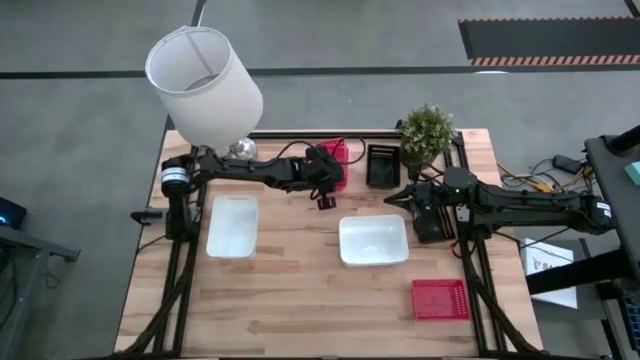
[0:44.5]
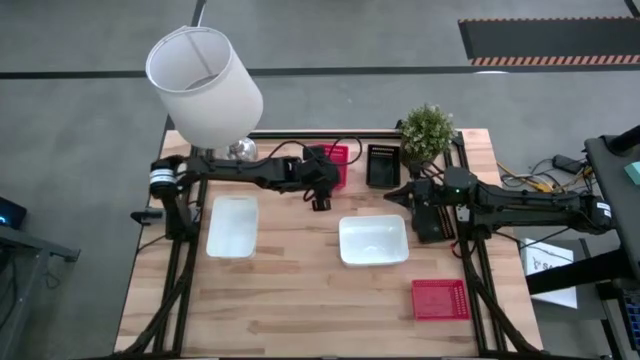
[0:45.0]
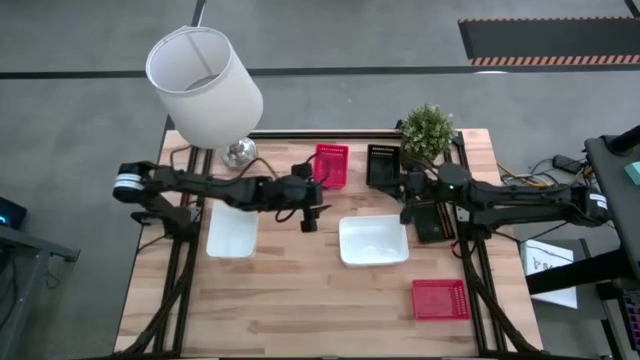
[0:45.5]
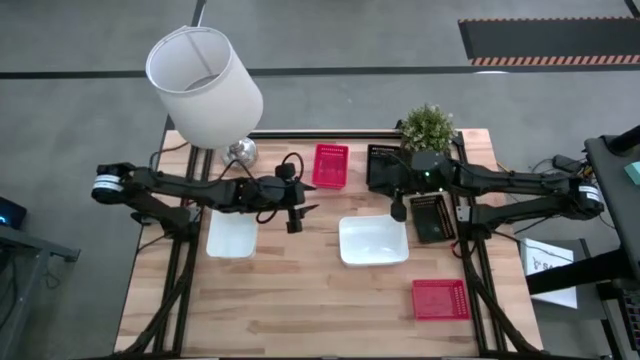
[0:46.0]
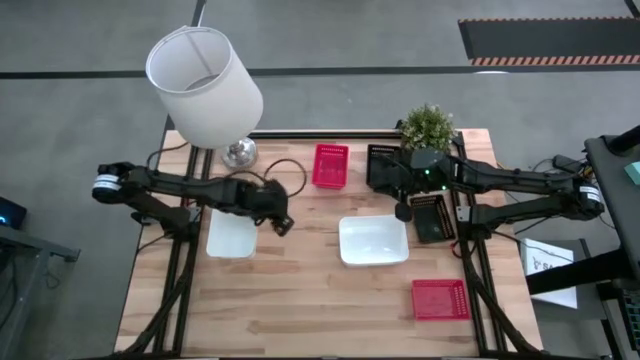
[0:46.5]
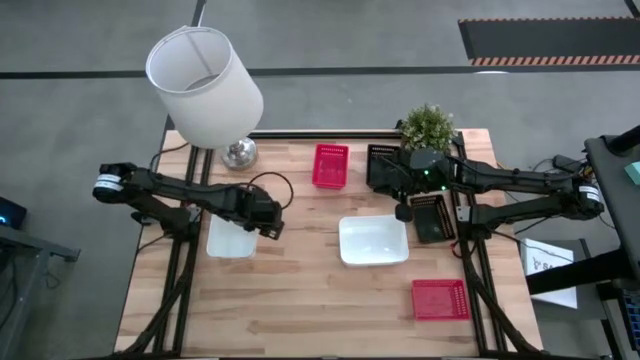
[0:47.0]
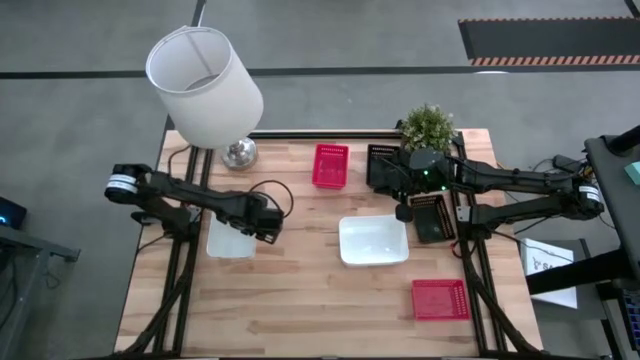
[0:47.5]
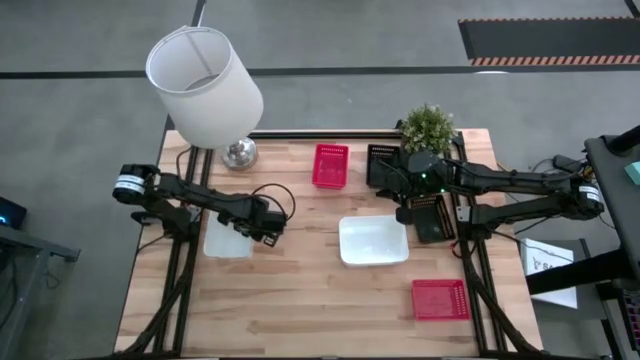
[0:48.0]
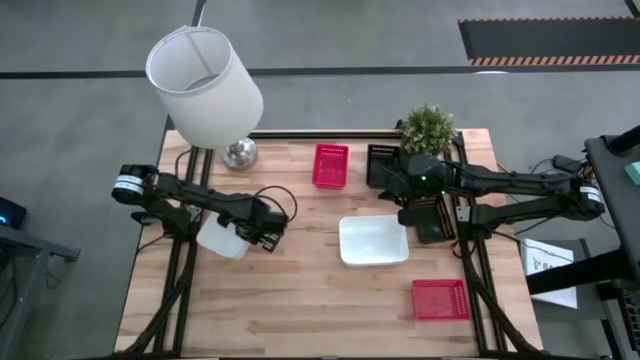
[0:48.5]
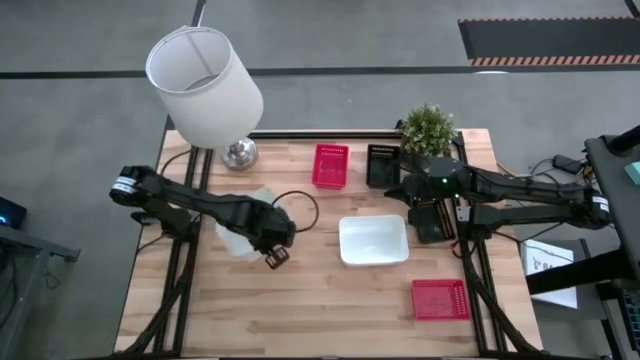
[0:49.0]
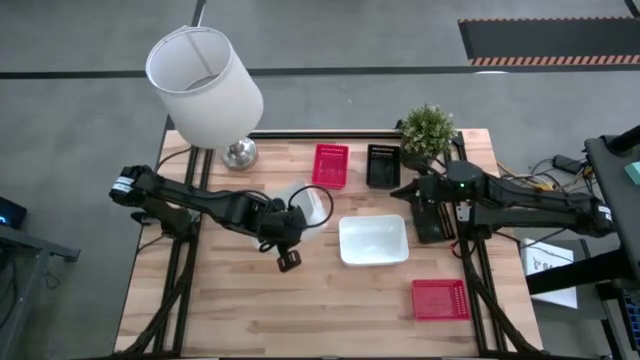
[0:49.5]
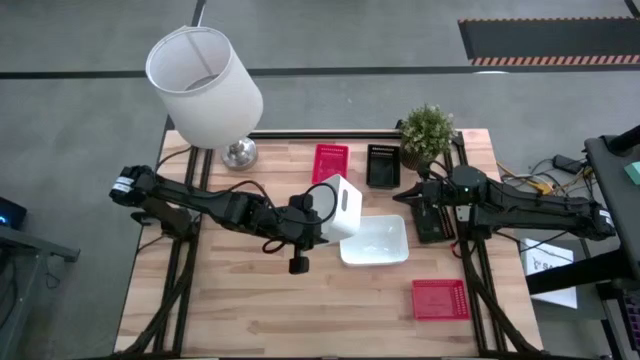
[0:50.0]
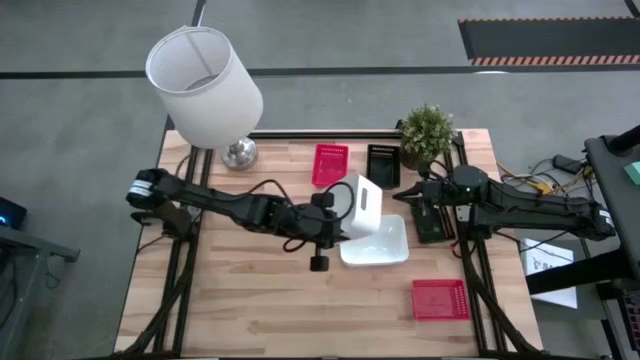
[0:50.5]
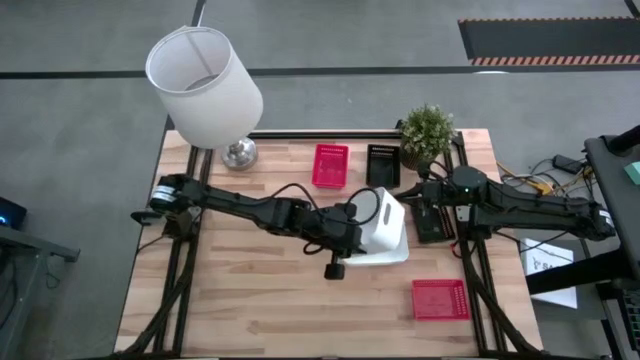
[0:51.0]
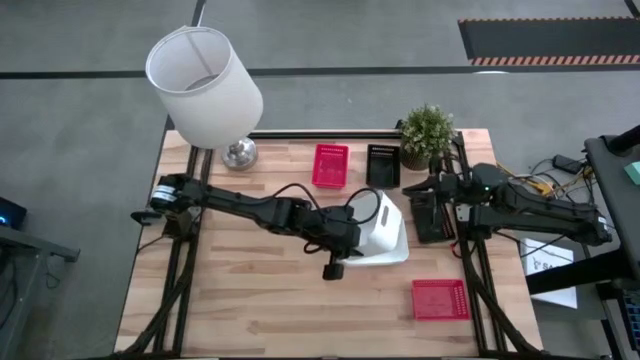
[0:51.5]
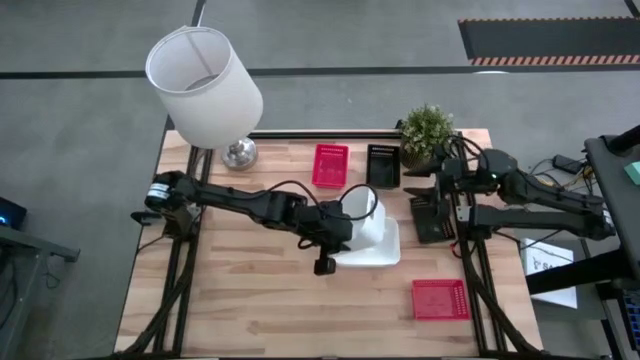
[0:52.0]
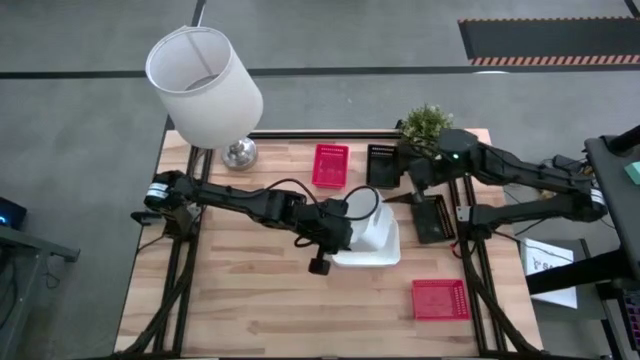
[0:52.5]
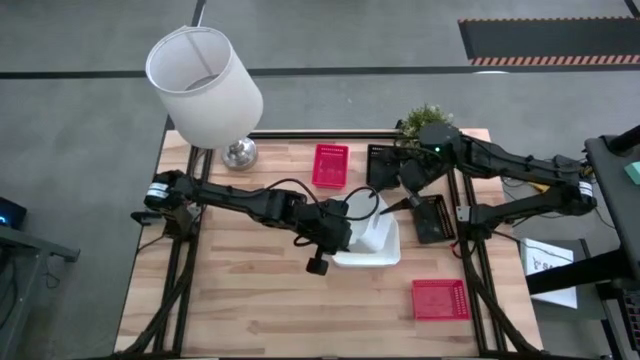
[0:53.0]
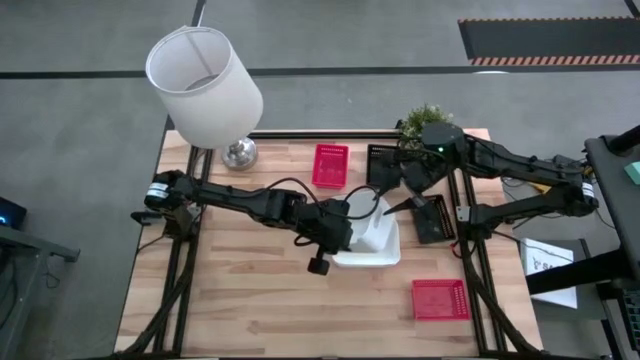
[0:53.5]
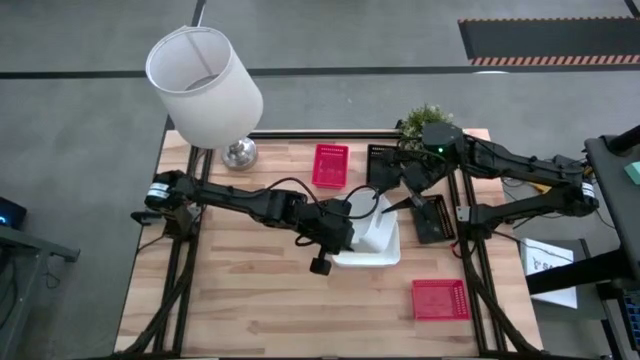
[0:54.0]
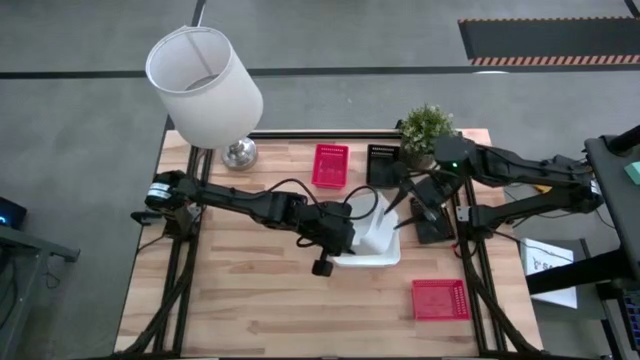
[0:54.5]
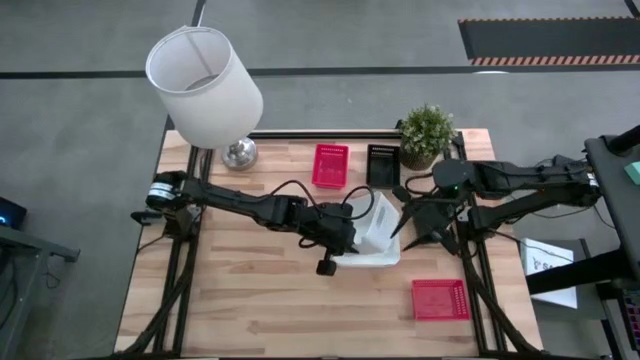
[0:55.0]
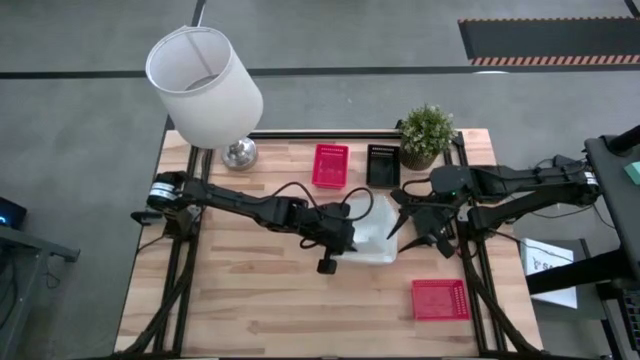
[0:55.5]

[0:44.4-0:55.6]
Stack the left white bin into the other white bins

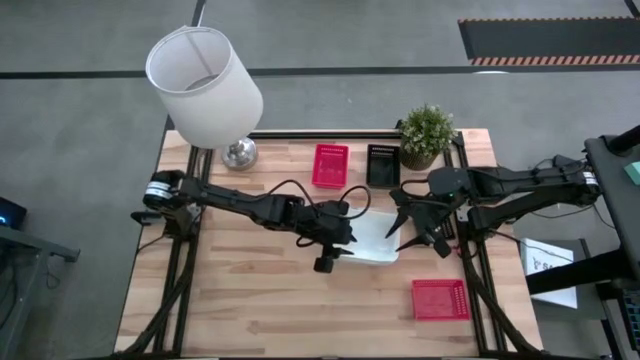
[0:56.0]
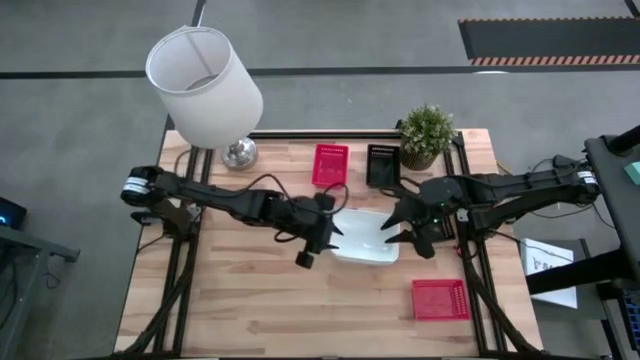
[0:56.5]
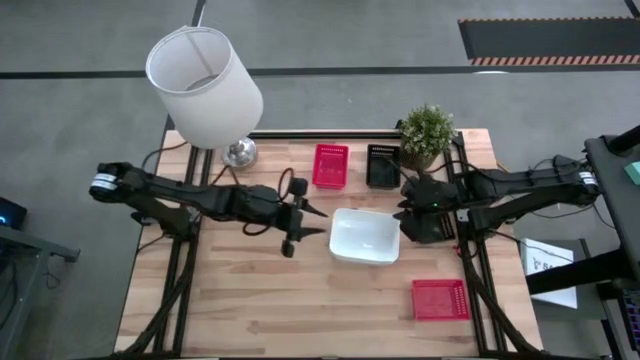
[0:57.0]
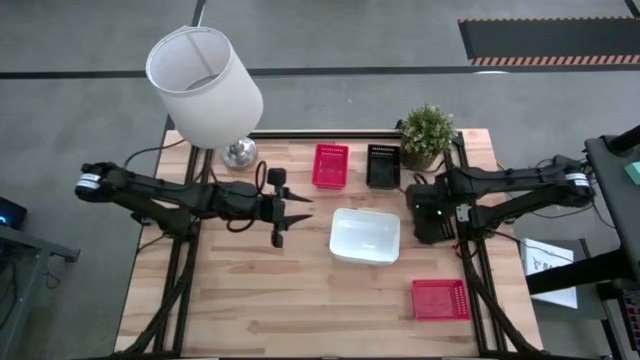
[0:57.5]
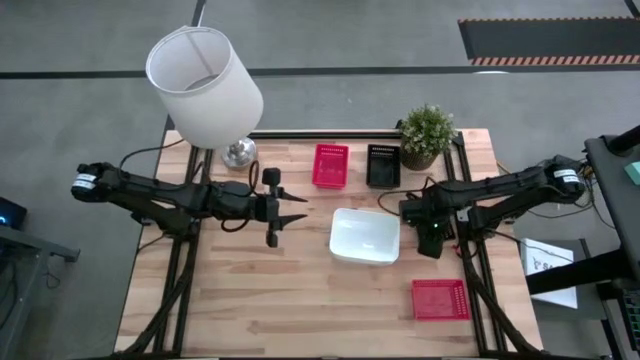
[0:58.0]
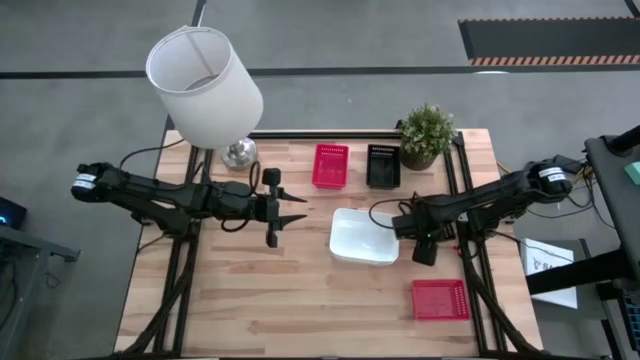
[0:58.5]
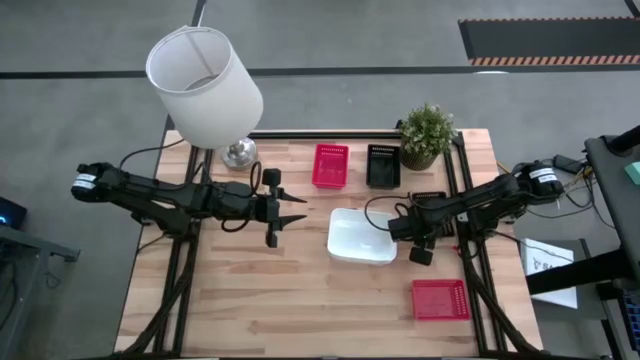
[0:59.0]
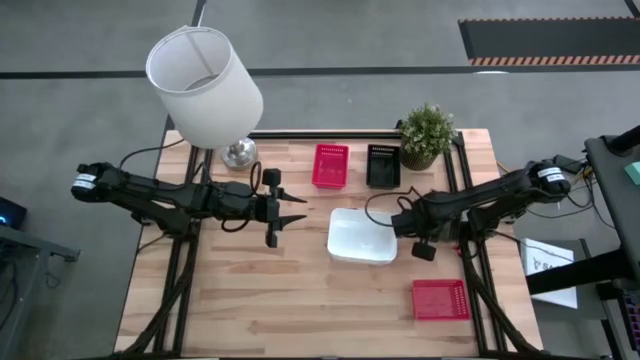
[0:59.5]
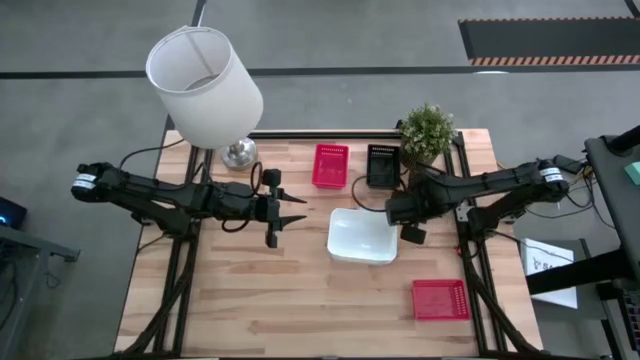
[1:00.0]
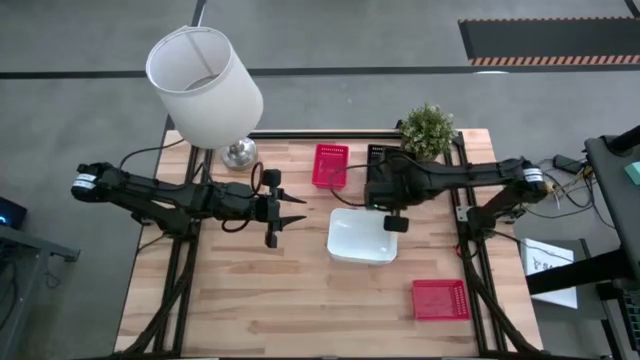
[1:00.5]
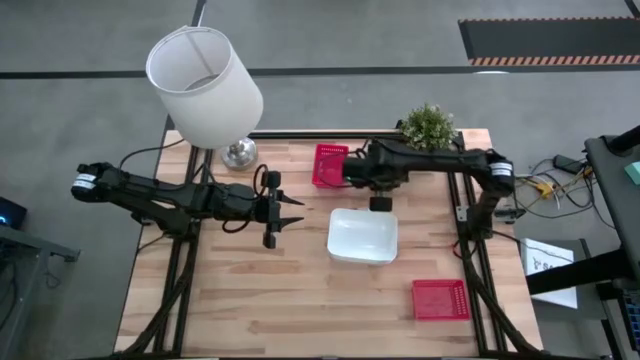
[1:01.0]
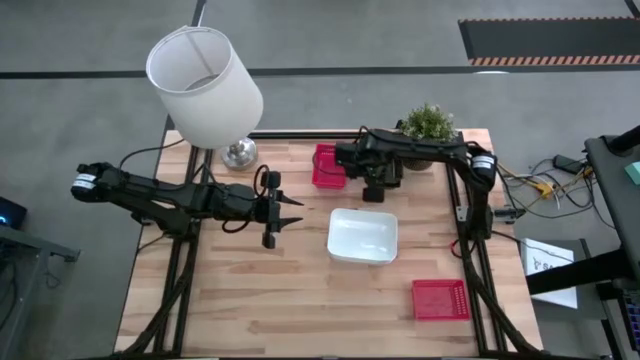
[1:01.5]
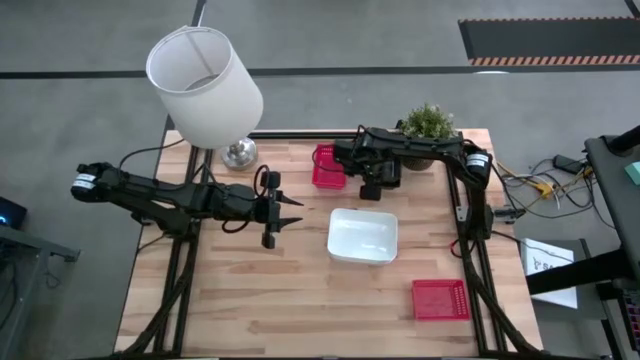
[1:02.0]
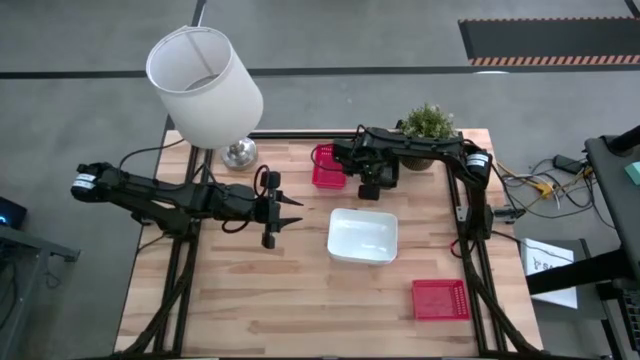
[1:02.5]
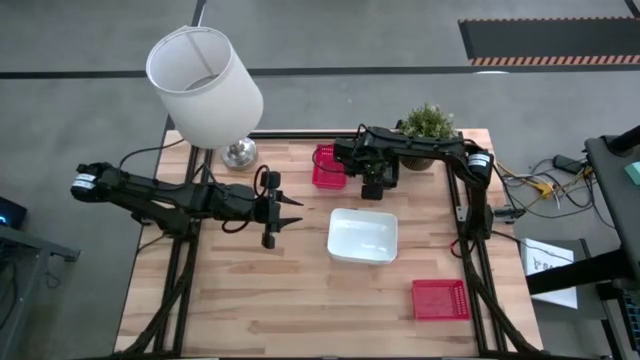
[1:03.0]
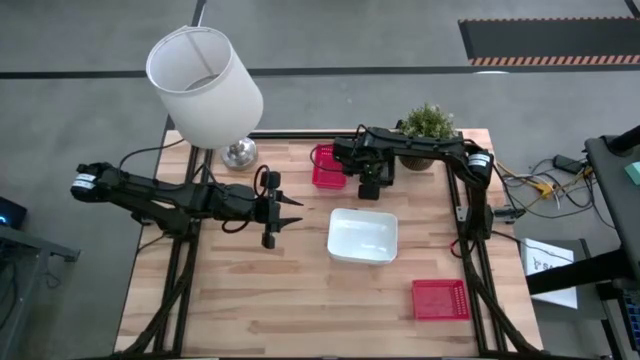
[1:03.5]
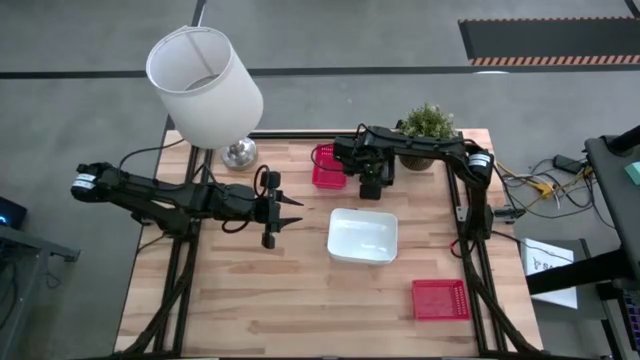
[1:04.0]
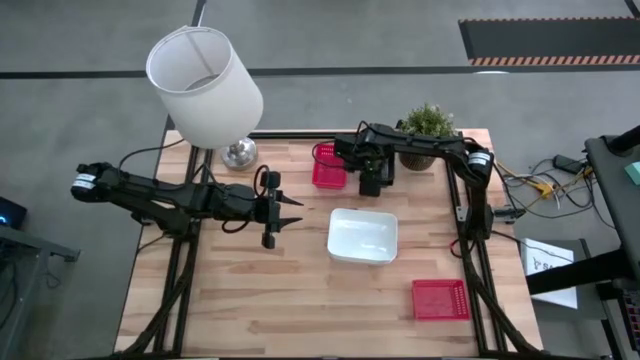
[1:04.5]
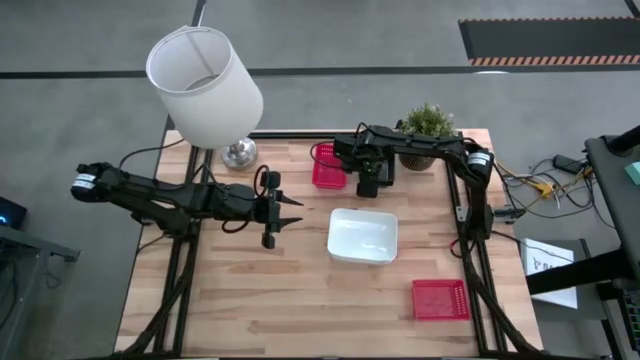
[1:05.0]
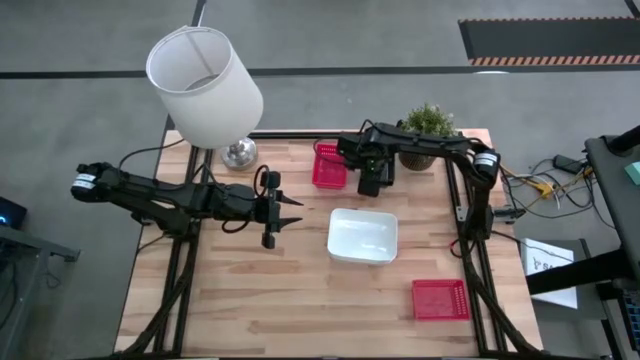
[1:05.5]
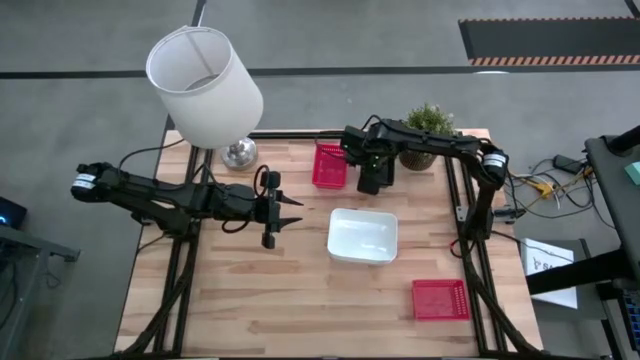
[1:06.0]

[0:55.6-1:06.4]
Stack the bottom black bin into the other black bins
